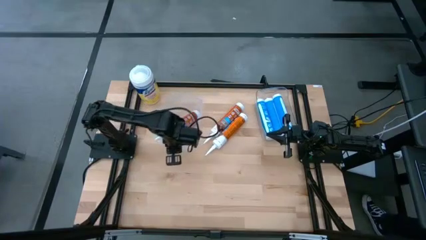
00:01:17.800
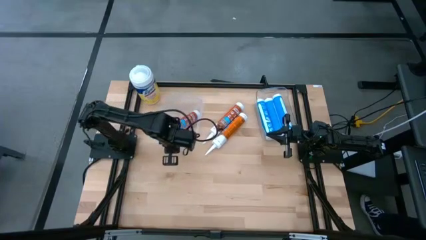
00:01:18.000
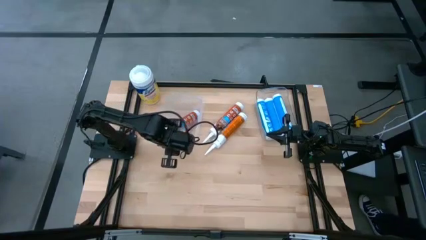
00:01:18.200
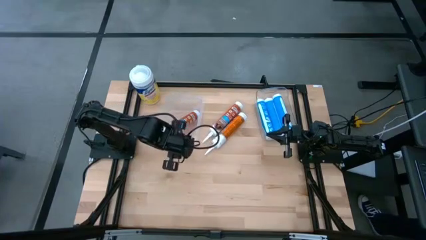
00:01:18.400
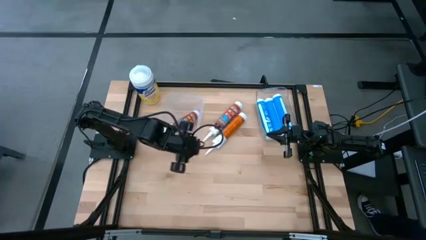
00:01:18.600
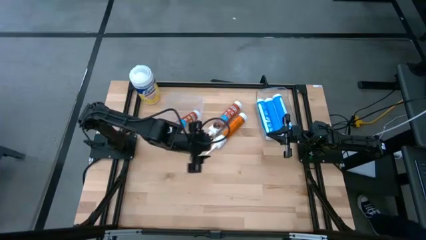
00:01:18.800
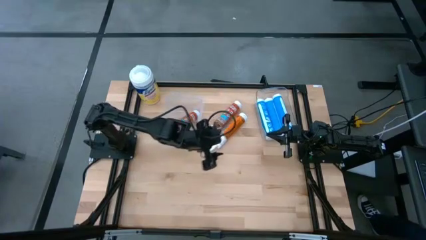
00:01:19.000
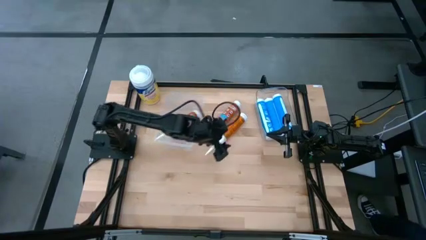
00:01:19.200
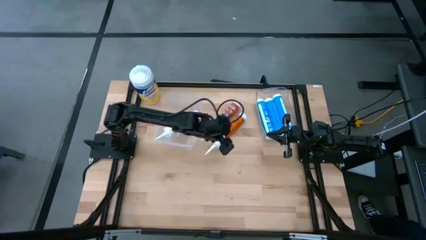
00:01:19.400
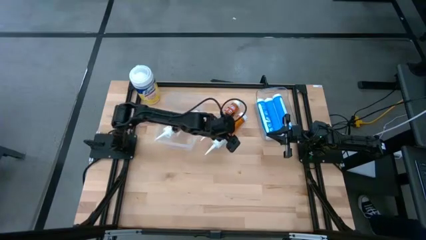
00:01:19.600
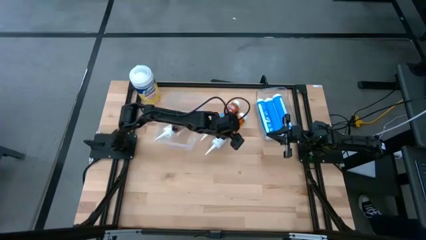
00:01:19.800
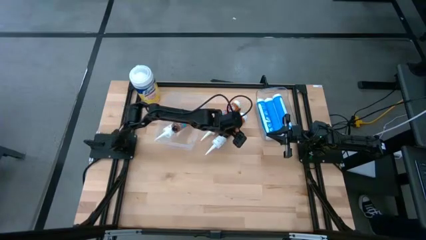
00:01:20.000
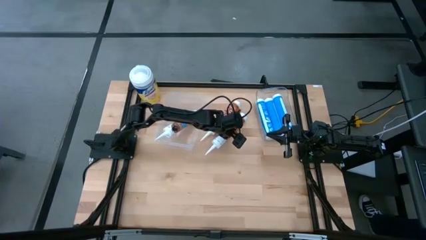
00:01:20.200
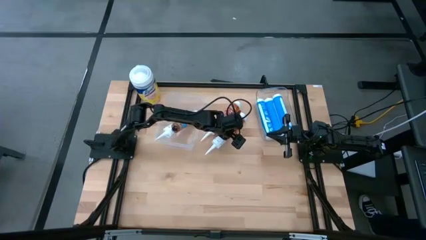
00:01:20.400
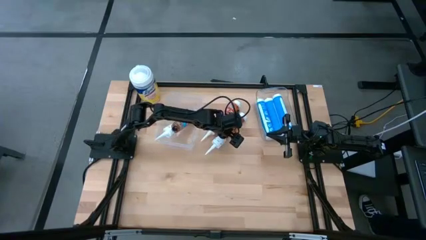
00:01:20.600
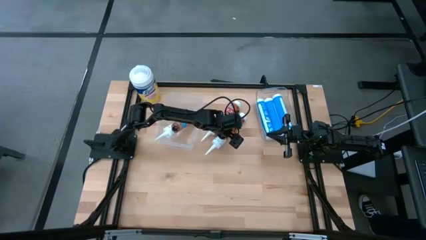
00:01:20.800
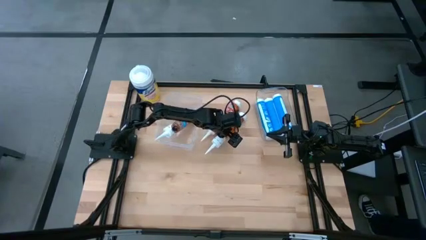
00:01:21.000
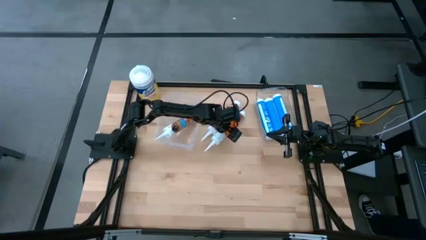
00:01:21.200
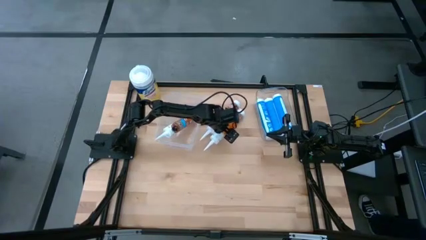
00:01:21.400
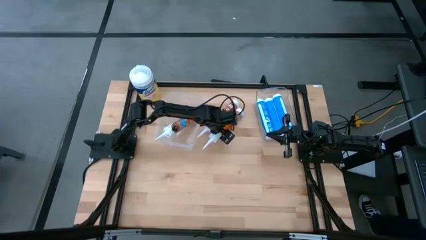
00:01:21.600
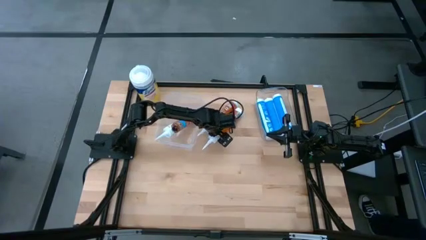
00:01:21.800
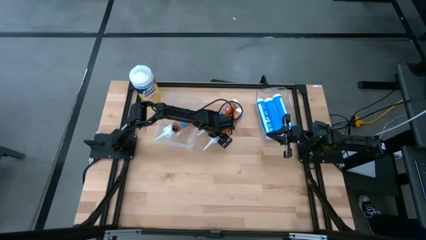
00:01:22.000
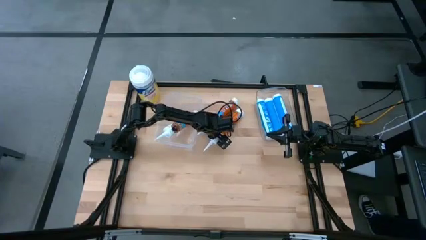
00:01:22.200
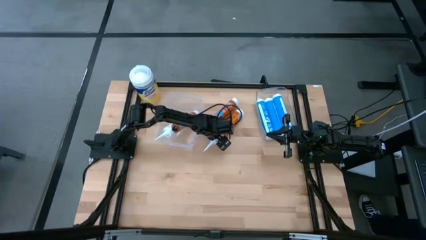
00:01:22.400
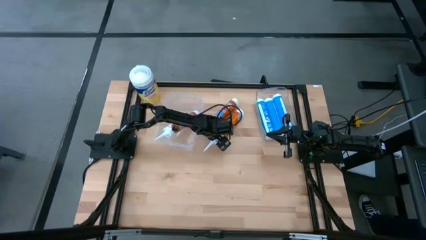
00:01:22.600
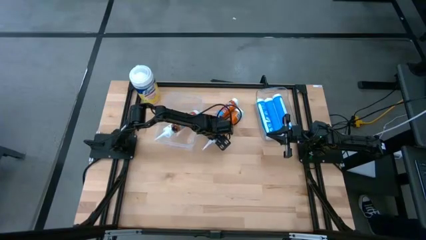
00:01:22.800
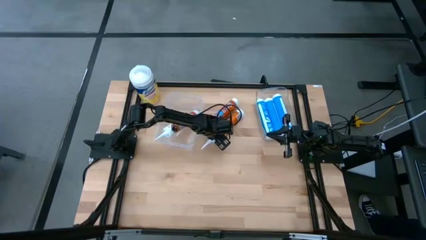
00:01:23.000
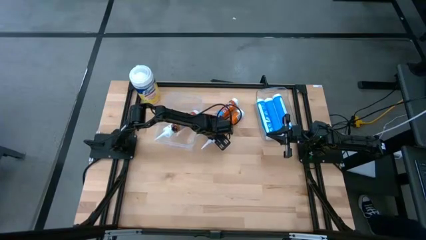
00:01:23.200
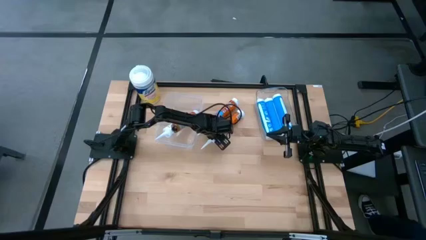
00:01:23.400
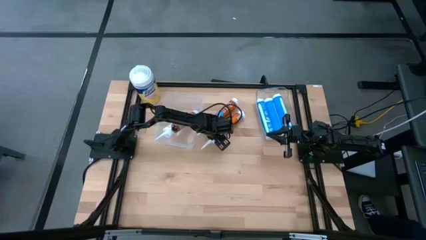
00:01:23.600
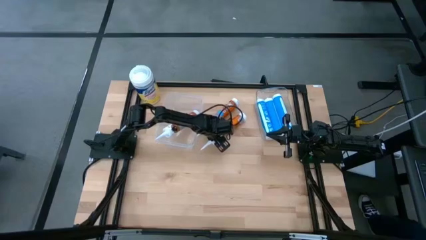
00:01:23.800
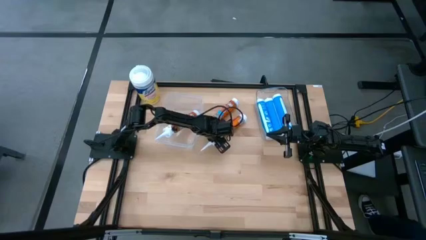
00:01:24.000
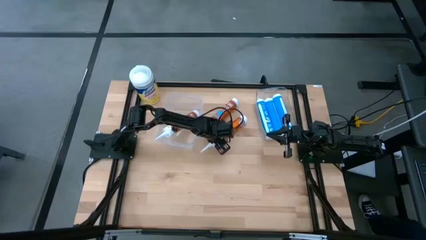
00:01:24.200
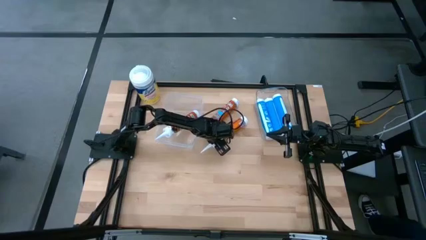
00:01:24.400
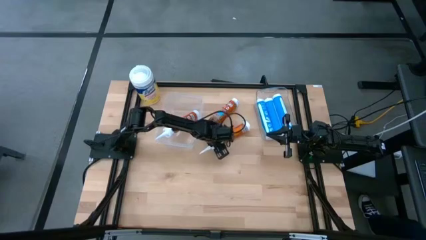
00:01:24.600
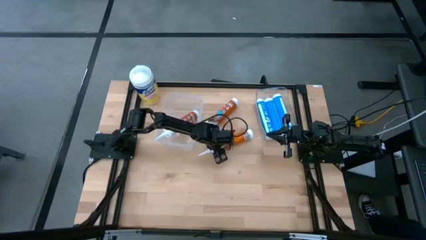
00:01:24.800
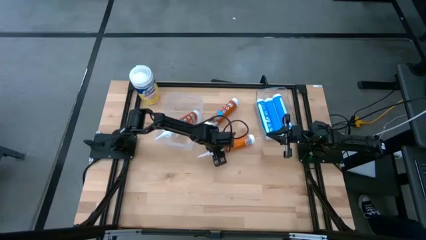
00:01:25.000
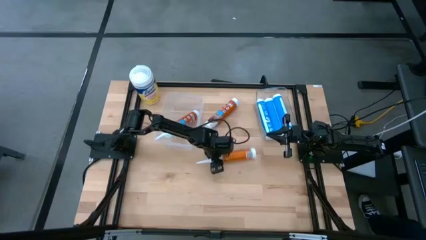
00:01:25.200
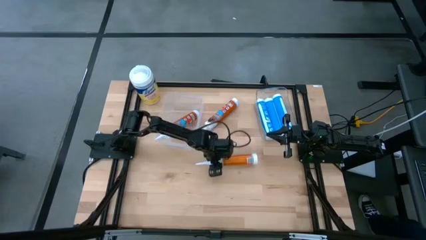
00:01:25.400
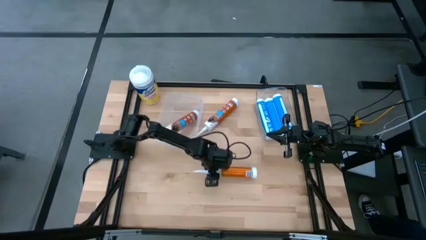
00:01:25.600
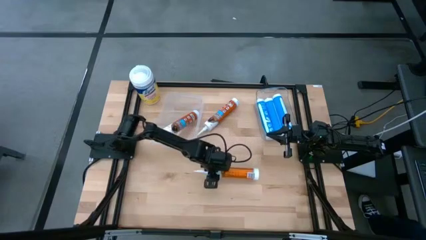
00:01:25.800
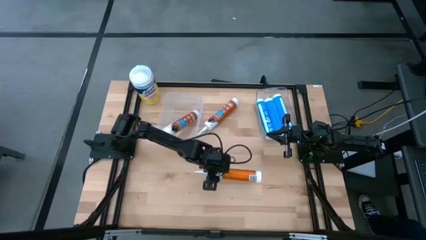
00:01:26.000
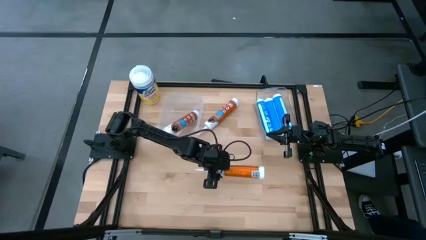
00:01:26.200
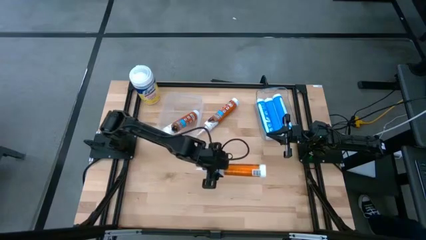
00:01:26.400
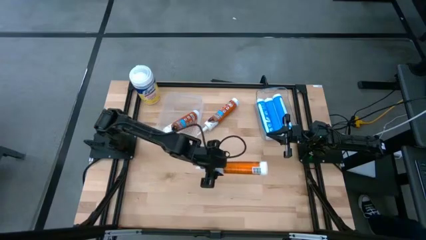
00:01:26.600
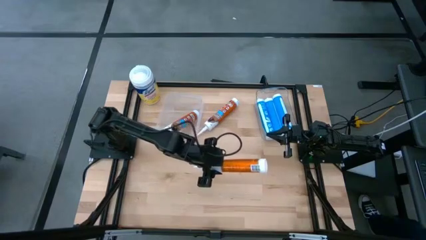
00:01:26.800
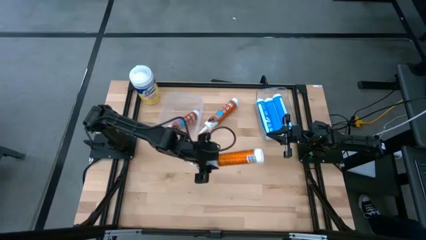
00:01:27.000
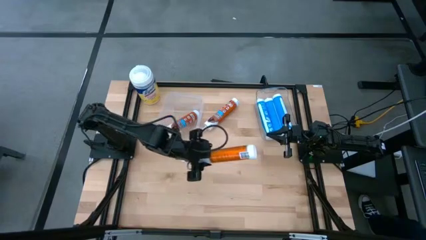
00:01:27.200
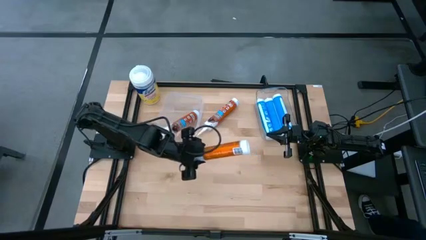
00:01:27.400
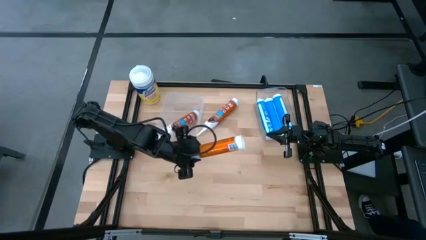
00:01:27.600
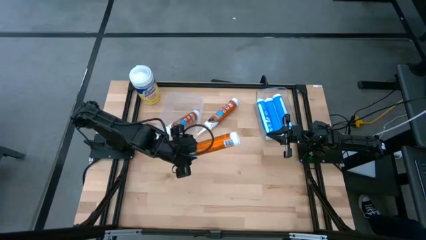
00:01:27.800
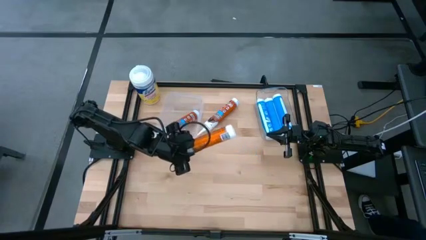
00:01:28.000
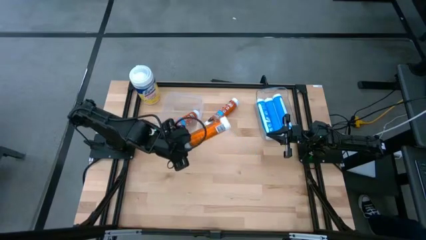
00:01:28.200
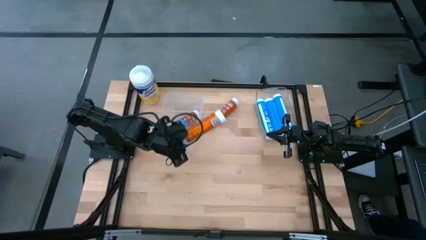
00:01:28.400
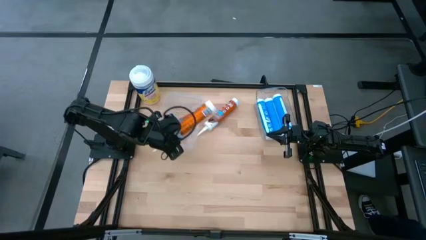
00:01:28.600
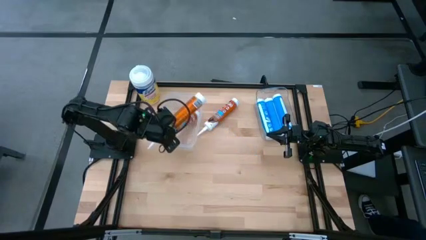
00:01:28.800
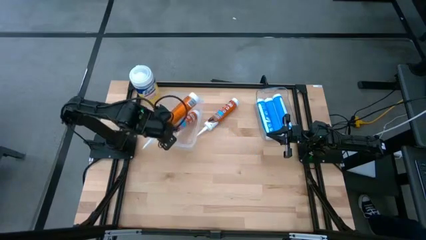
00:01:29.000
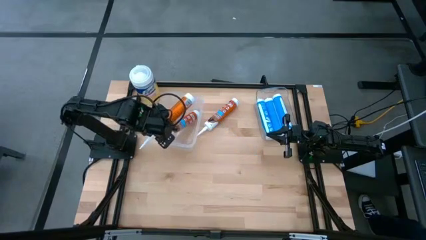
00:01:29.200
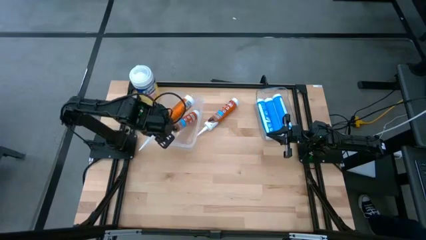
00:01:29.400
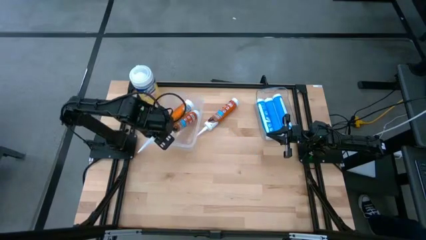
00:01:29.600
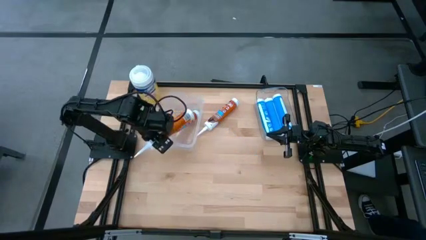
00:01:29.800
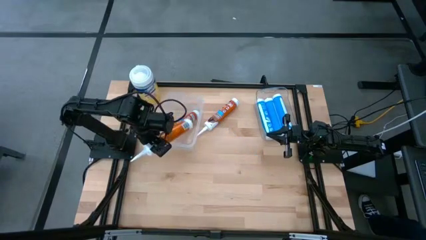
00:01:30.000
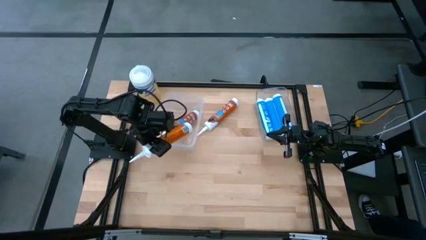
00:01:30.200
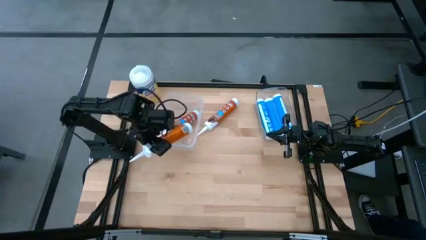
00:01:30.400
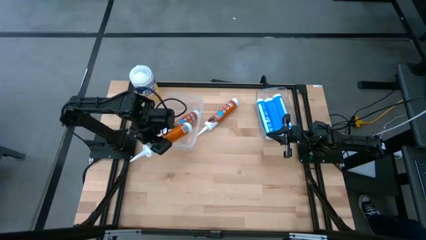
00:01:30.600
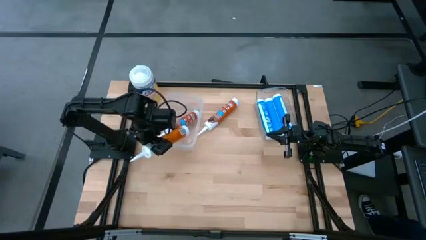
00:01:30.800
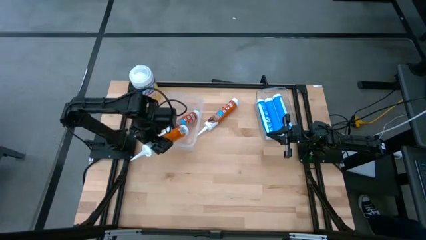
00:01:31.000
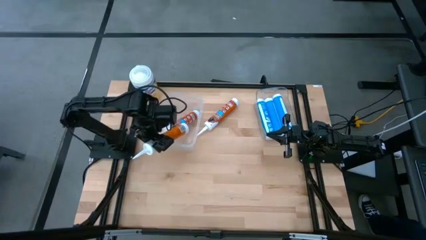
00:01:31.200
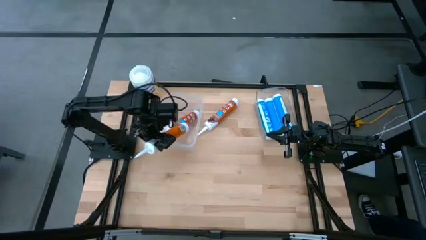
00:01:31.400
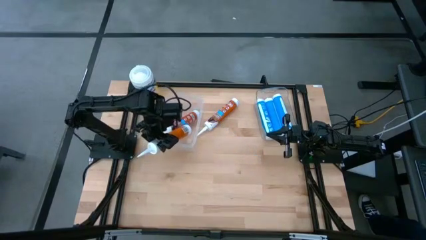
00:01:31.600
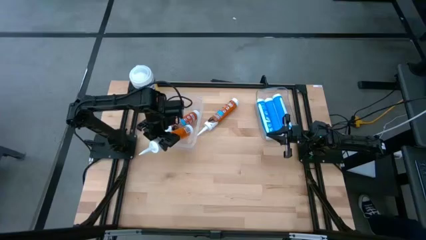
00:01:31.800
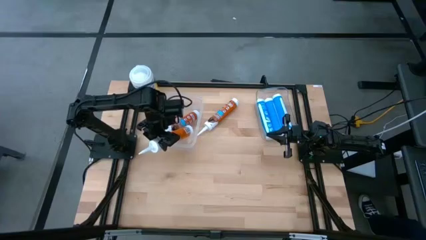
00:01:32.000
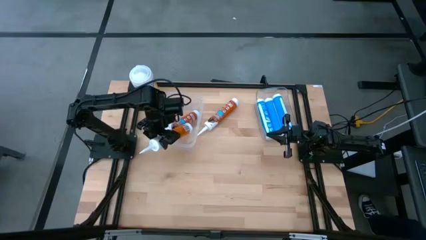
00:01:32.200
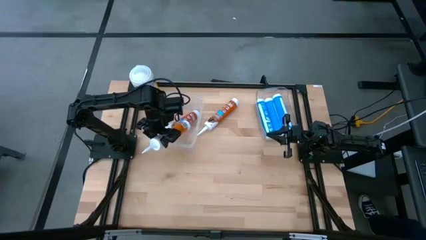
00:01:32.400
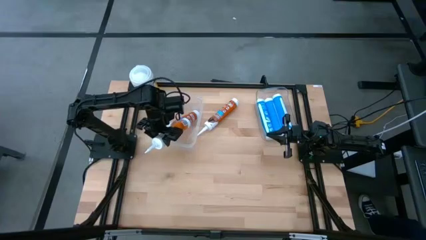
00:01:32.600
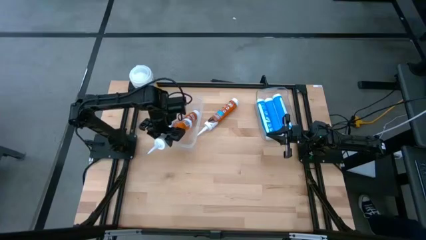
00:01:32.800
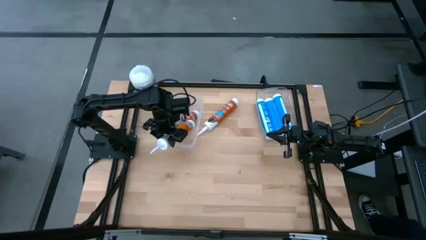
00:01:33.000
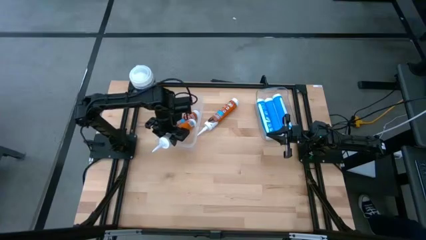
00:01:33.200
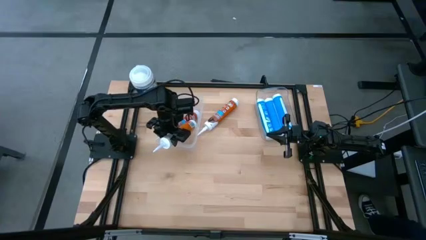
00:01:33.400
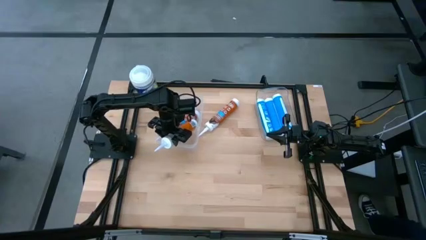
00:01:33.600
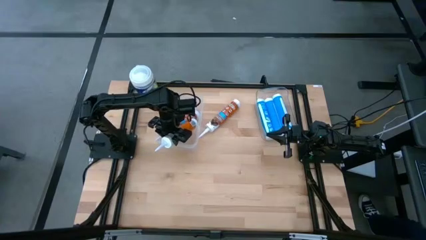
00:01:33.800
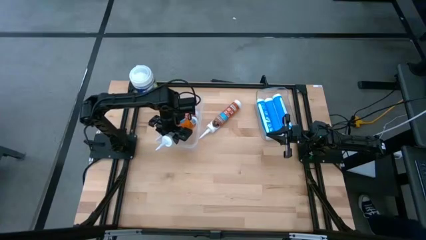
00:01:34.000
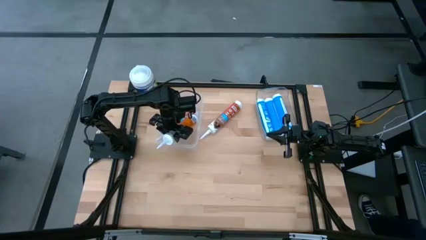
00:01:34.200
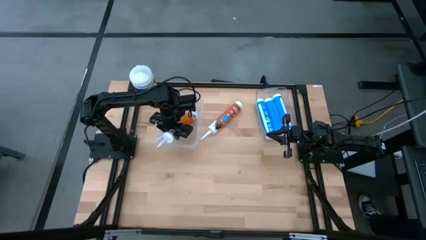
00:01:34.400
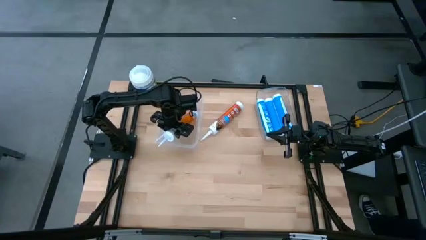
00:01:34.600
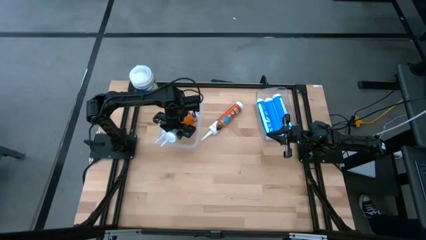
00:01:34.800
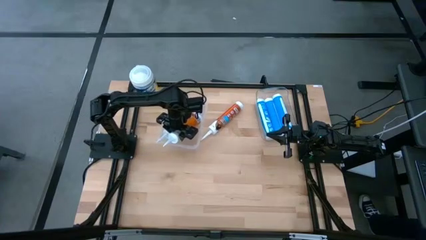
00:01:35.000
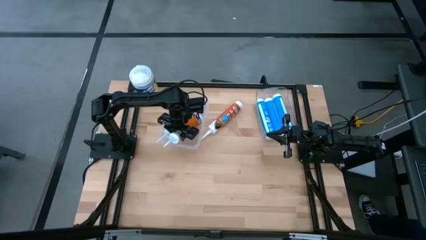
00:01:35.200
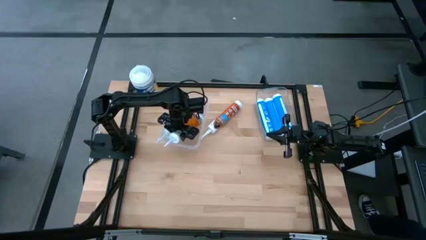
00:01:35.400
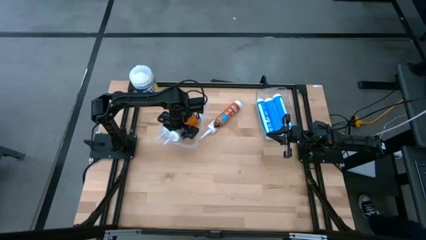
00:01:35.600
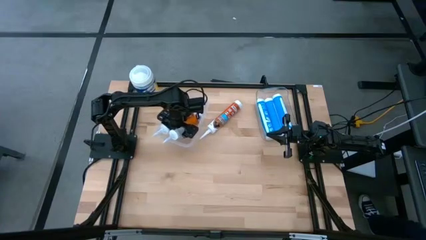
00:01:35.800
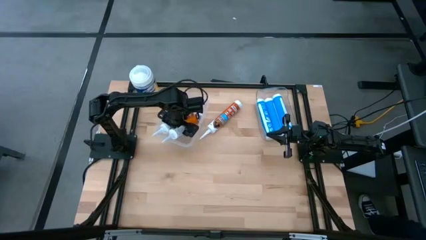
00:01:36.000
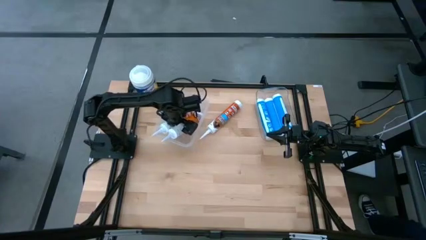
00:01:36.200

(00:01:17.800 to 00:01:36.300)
Task: Pick & place silicon tubes, Sealant and Lysol wipes
Put the bottom orange sealant into the transparent container
